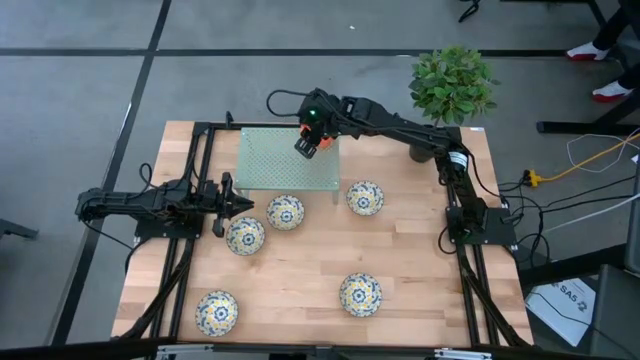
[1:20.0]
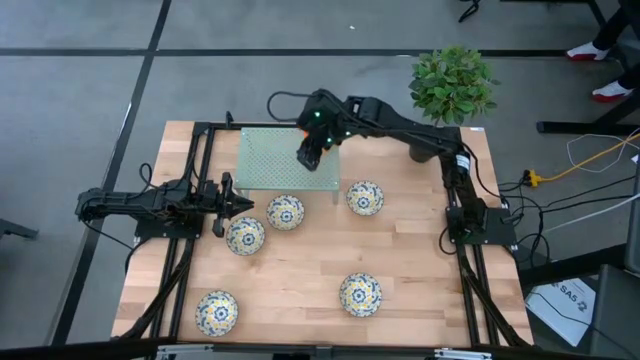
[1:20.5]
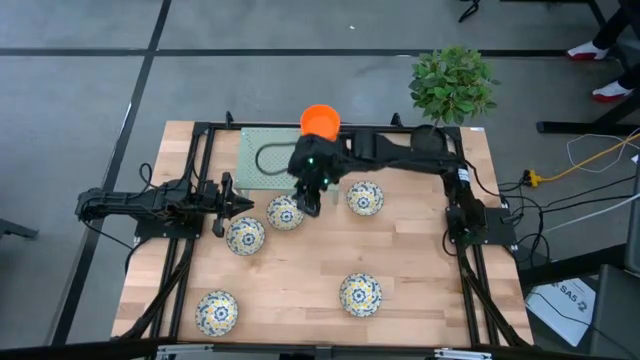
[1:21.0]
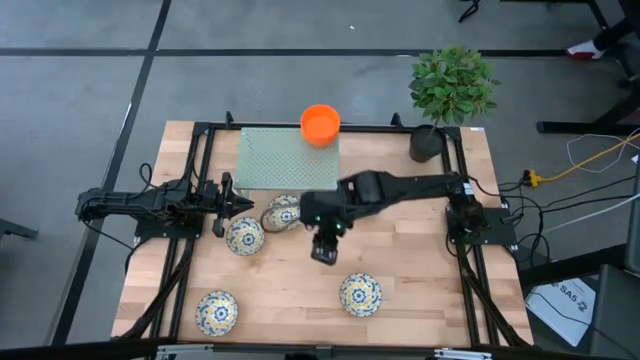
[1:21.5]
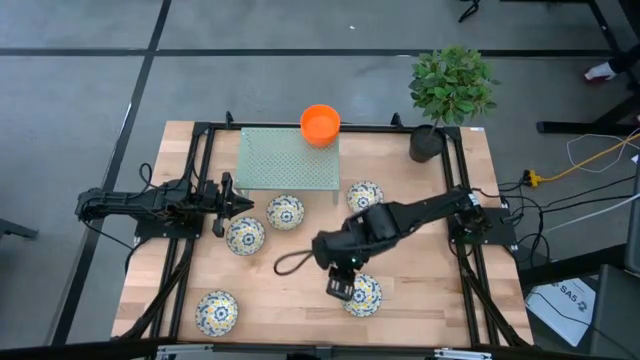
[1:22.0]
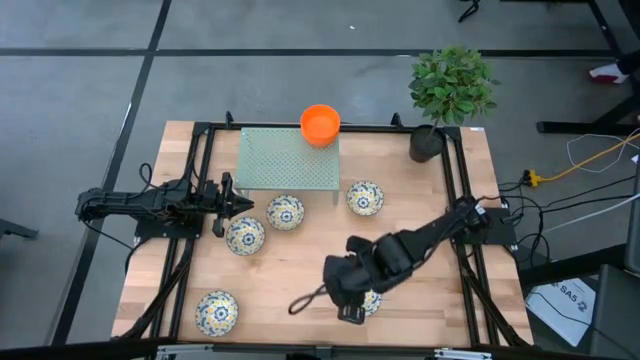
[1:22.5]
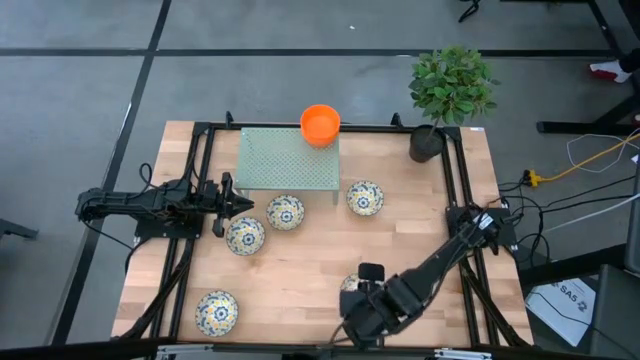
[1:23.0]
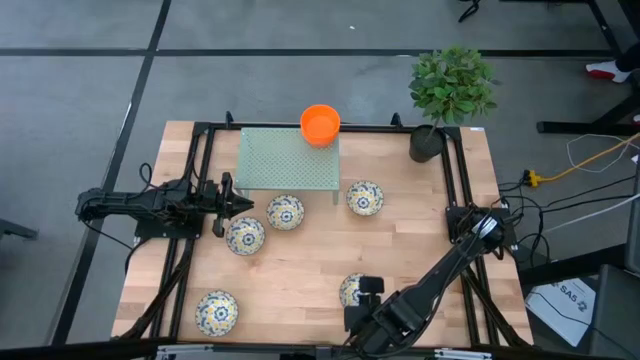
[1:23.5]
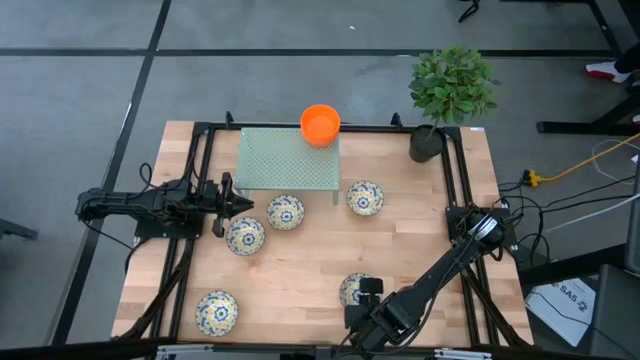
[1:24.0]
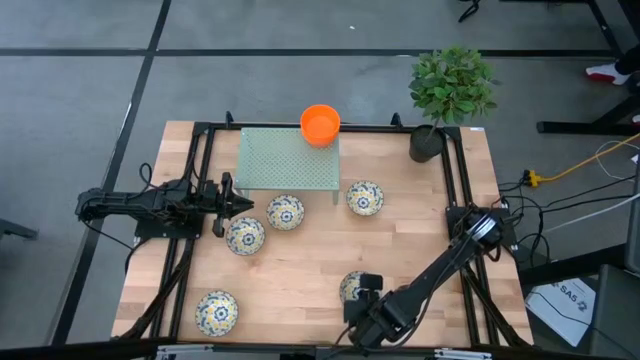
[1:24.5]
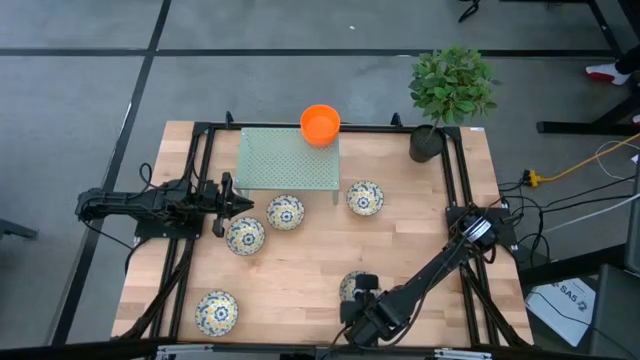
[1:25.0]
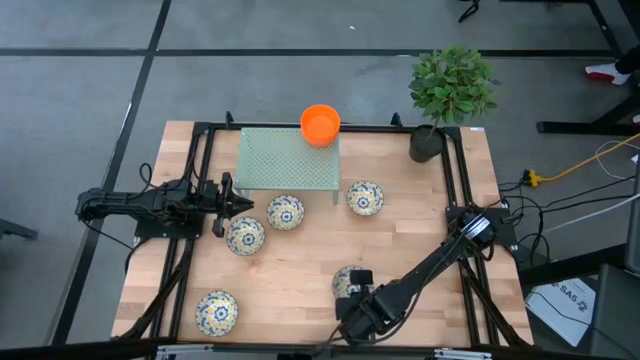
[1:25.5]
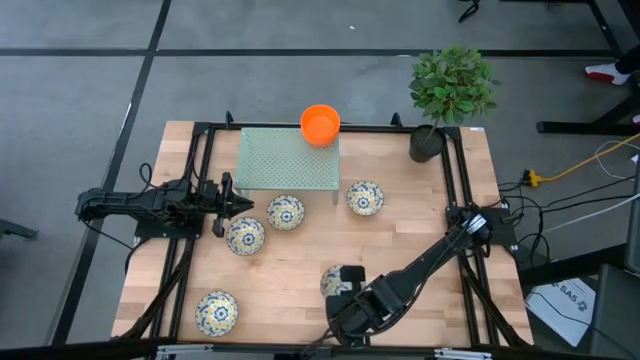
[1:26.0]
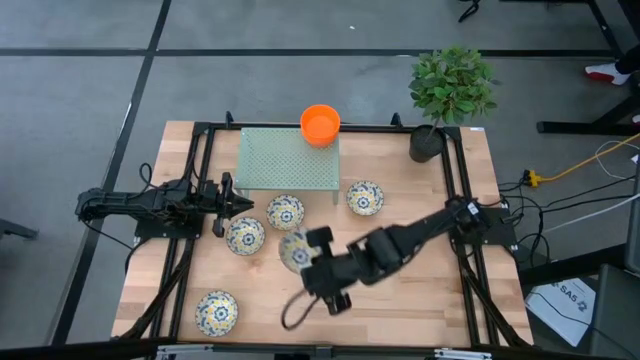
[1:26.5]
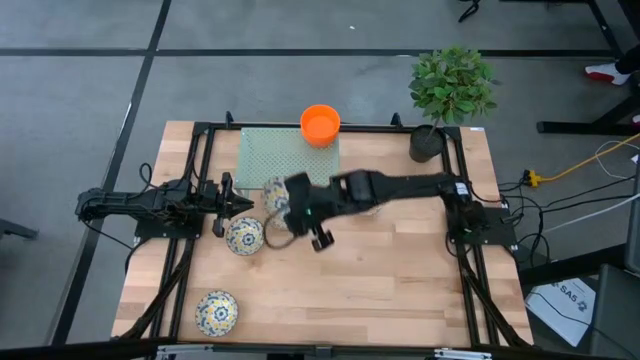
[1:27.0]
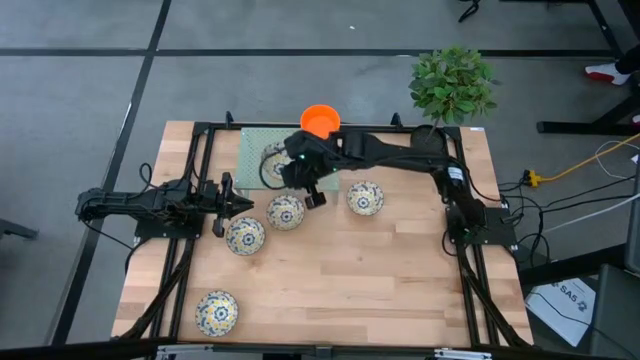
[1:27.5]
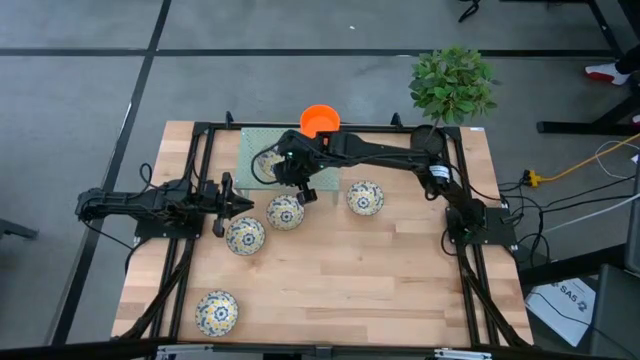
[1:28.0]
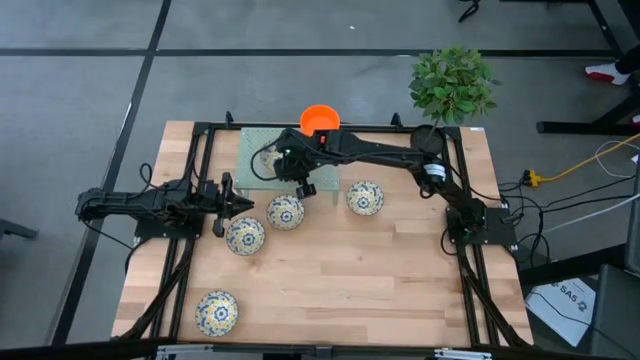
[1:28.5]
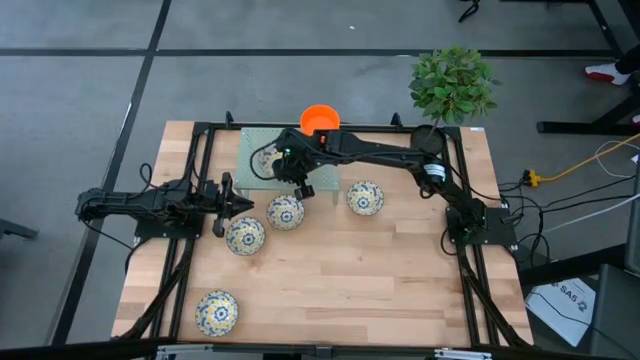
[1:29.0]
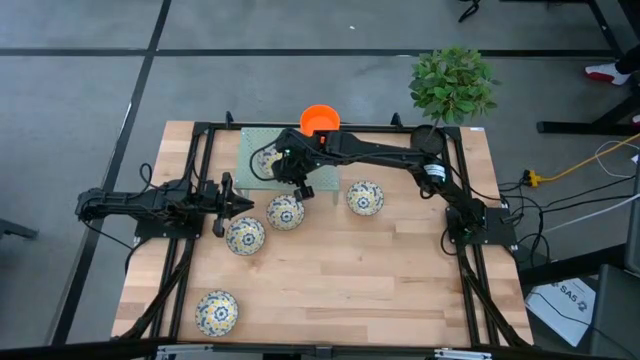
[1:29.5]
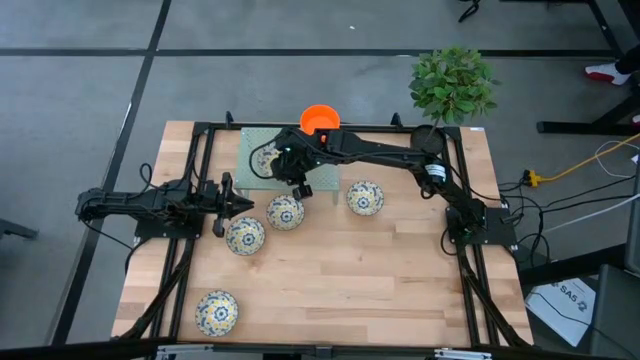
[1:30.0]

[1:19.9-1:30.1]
Task: Pick & Place Mini bowls
Put the yellow bowl on the shelf

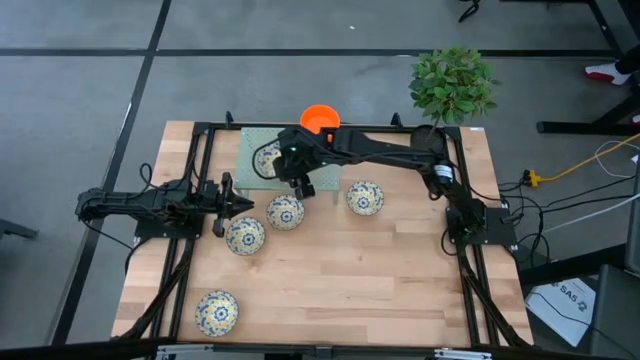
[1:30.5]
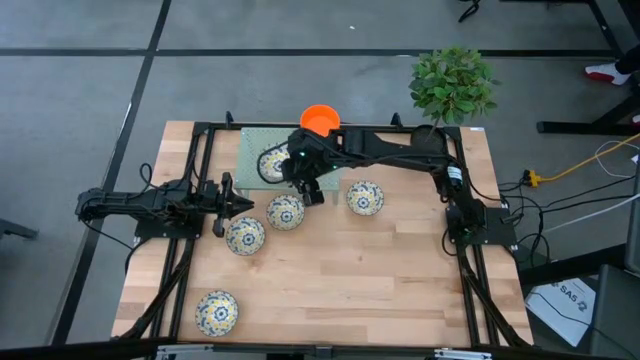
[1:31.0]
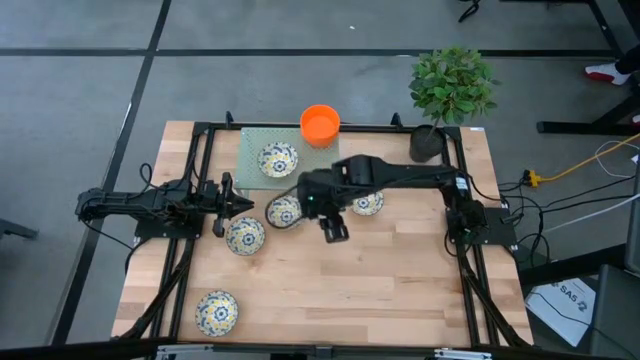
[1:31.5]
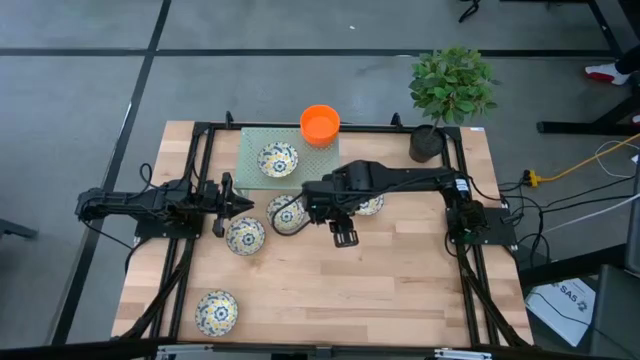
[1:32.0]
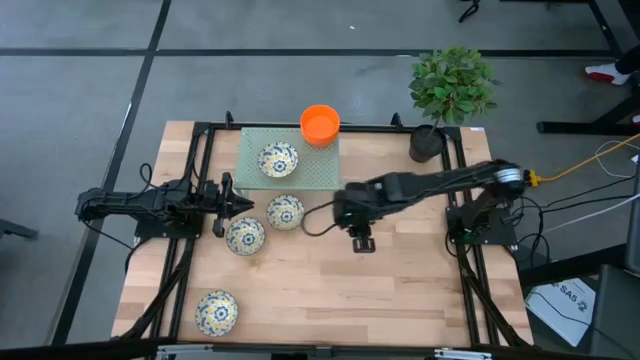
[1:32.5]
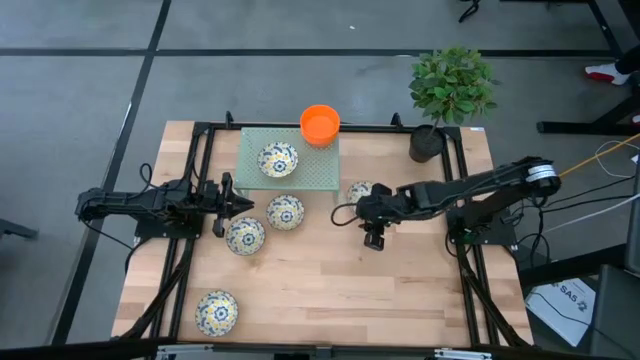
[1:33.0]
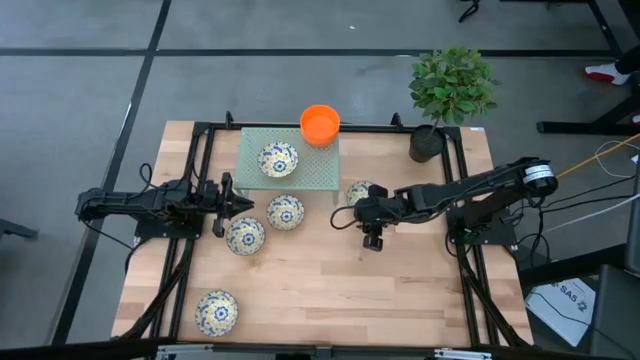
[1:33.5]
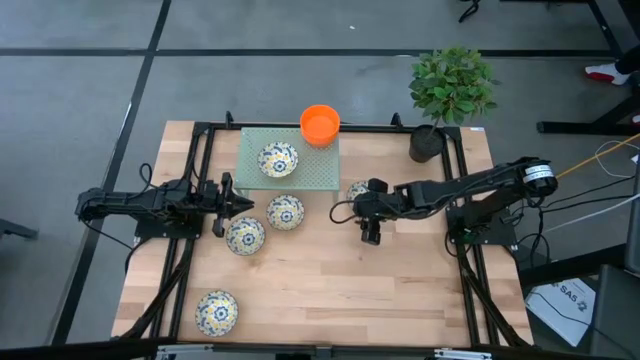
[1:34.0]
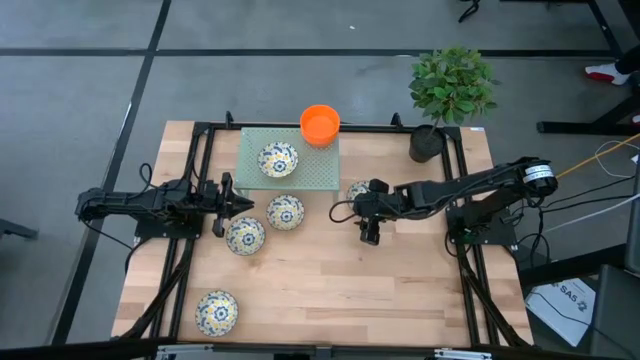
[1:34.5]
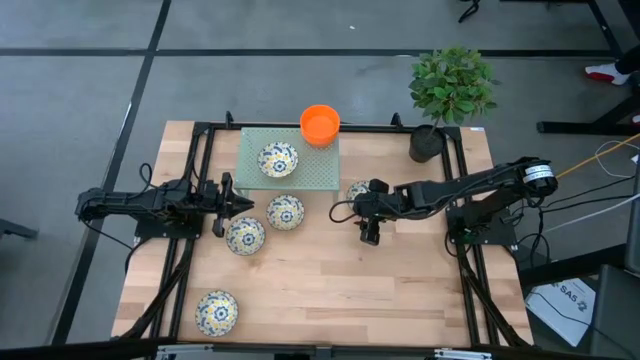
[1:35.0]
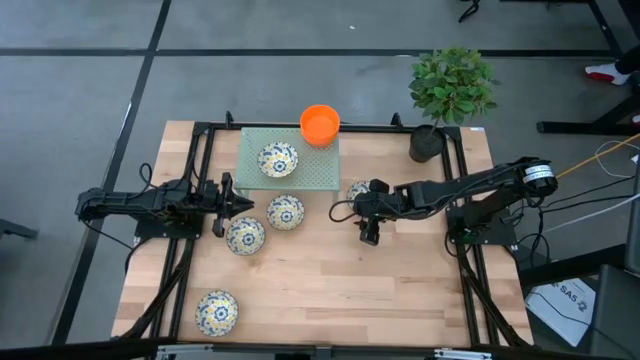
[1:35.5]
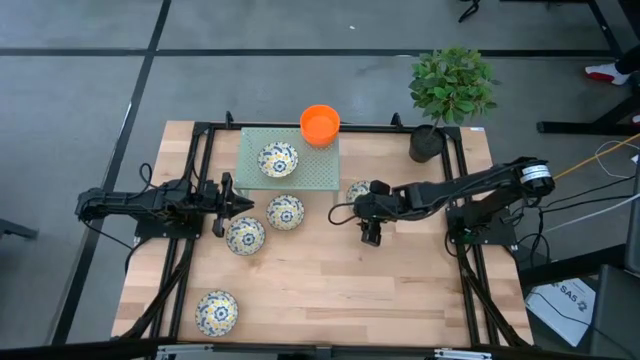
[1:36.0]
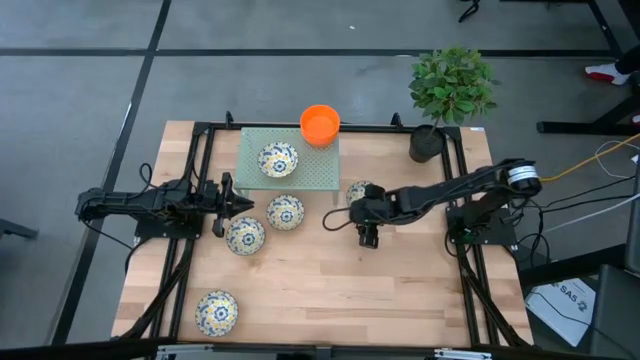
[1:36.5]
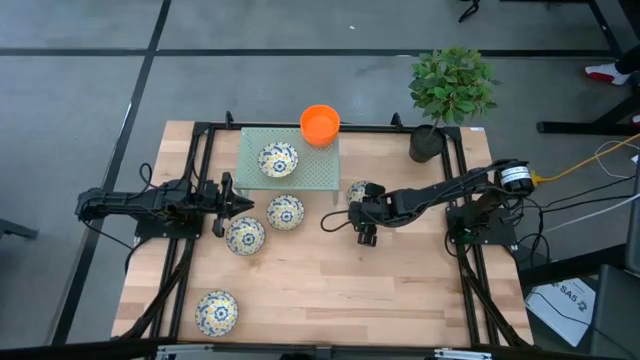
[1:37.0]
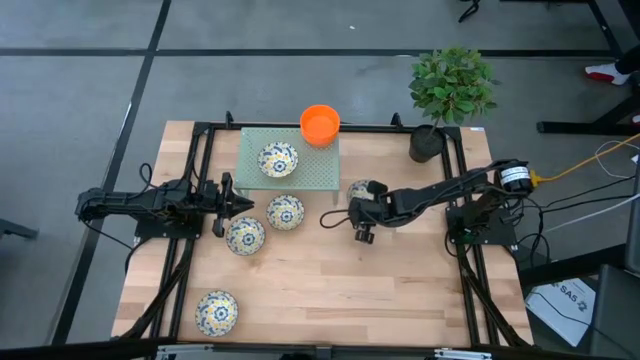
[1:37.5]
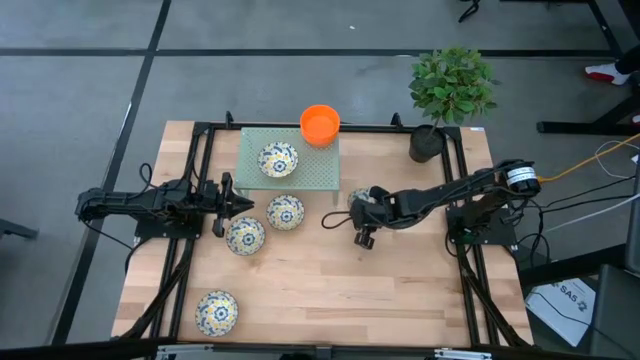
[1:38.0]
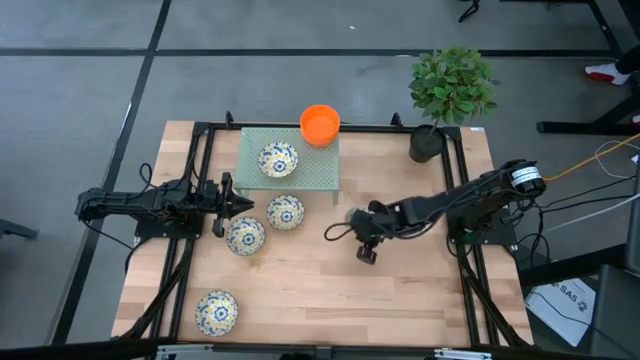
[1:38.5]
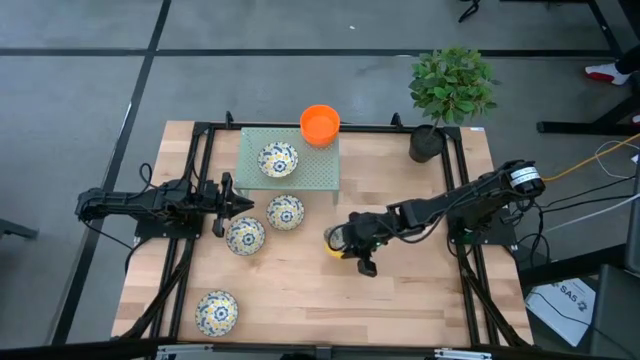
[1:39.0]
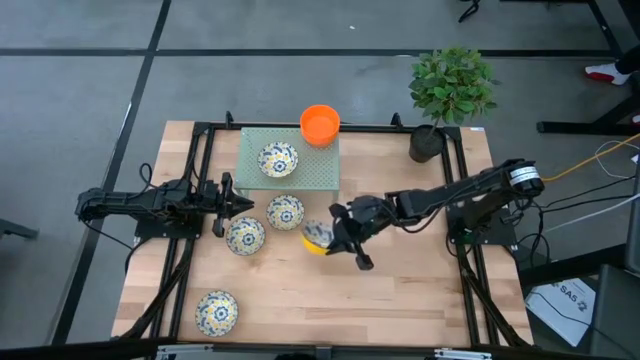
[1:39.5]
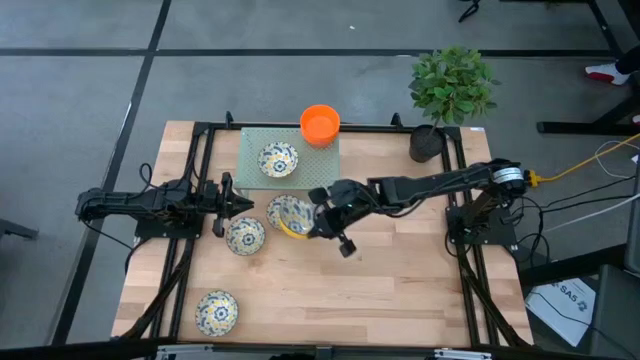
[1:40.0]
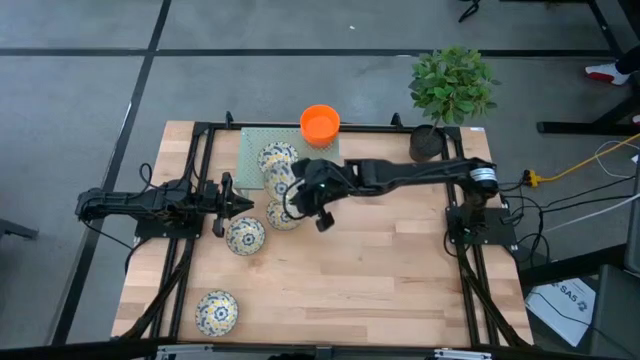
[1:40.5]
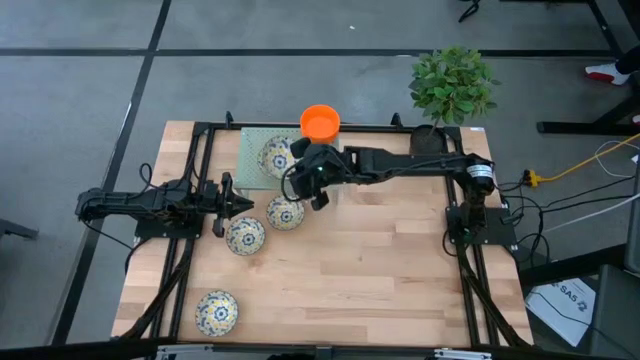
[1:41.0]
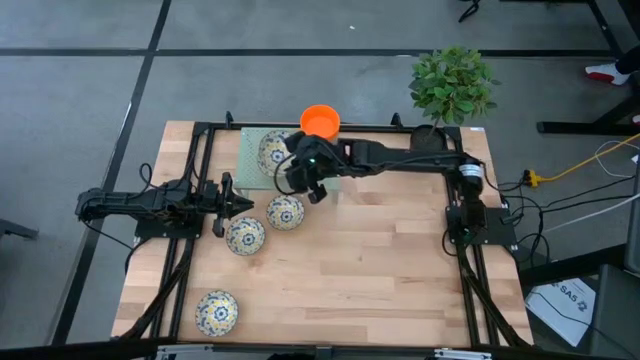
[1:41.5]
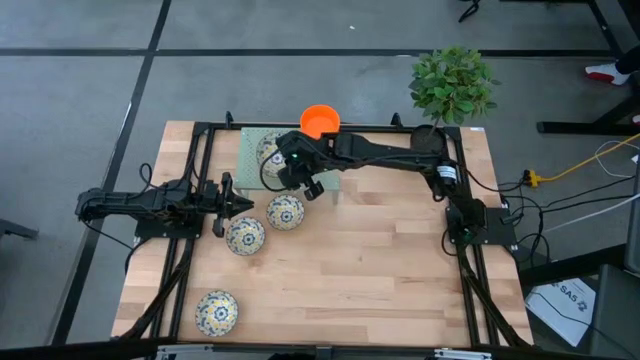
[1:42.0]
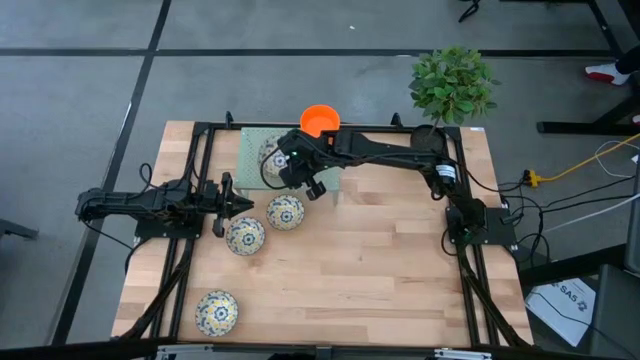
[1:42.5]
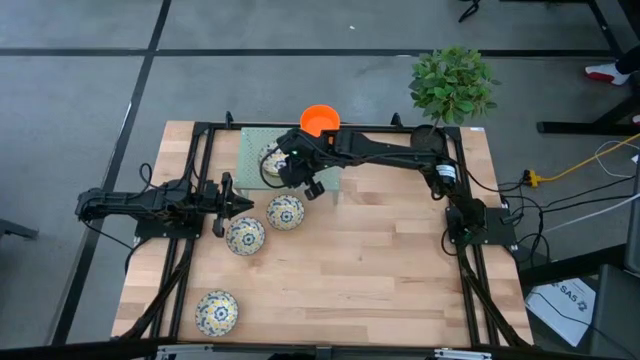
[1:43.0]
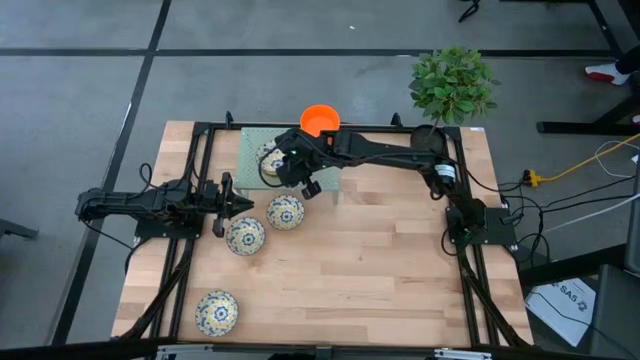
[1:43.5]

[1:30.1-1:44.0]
Stack the yellow bowl on top of the yellow bowl on the shelf
